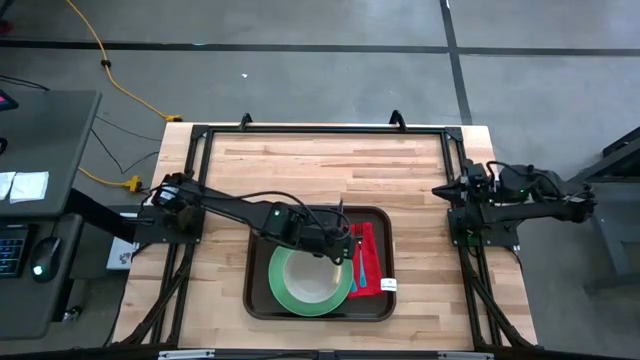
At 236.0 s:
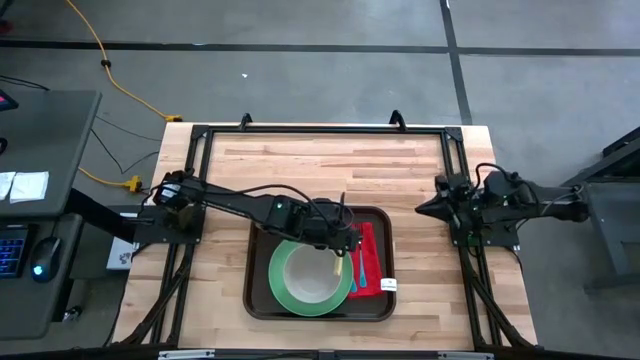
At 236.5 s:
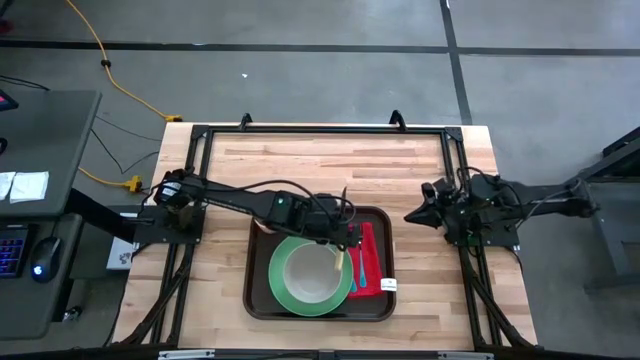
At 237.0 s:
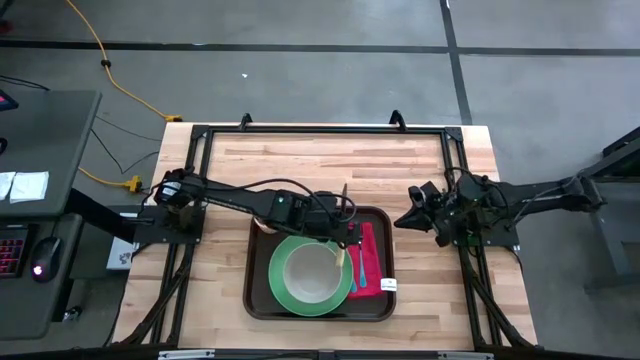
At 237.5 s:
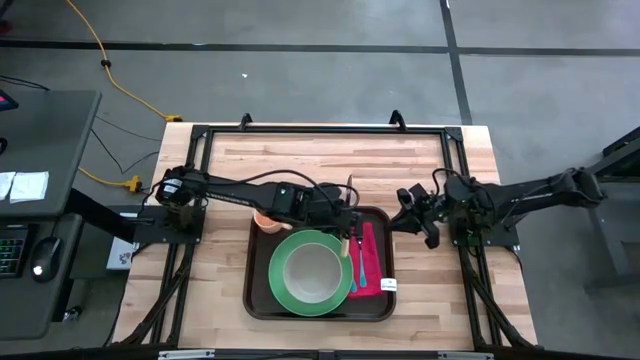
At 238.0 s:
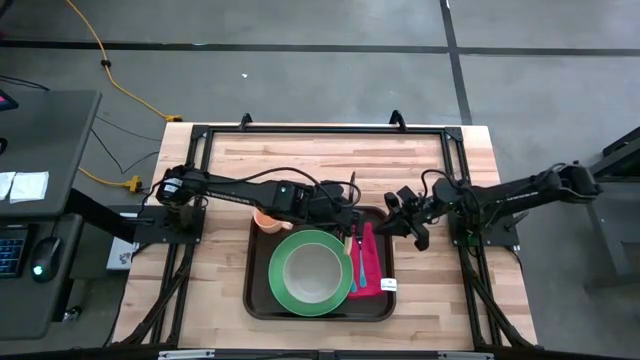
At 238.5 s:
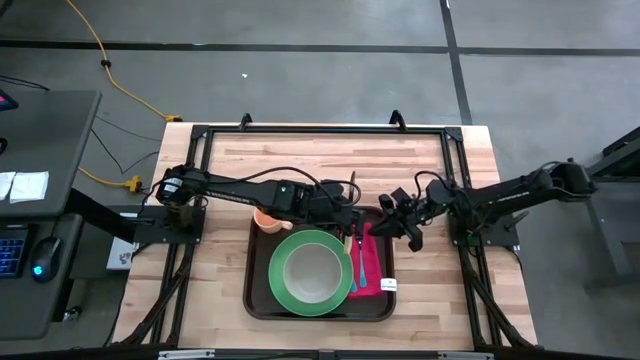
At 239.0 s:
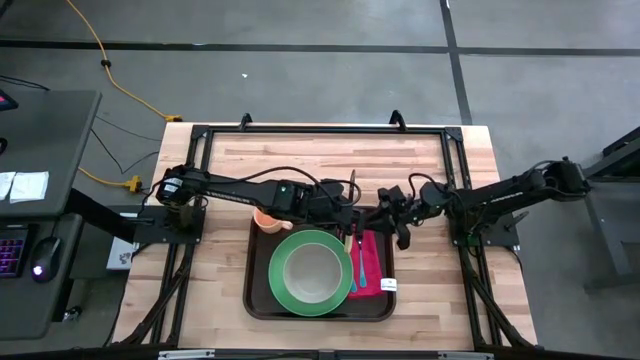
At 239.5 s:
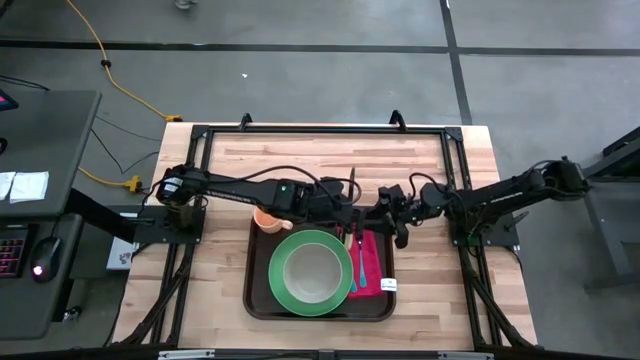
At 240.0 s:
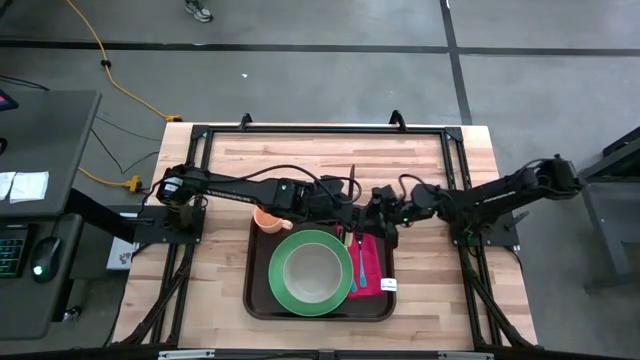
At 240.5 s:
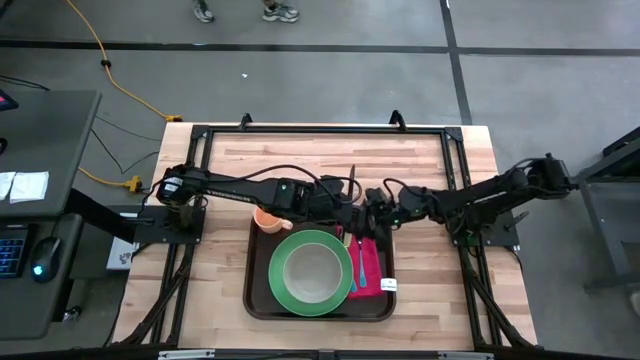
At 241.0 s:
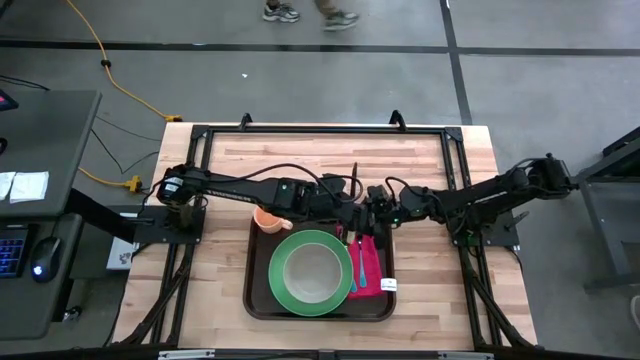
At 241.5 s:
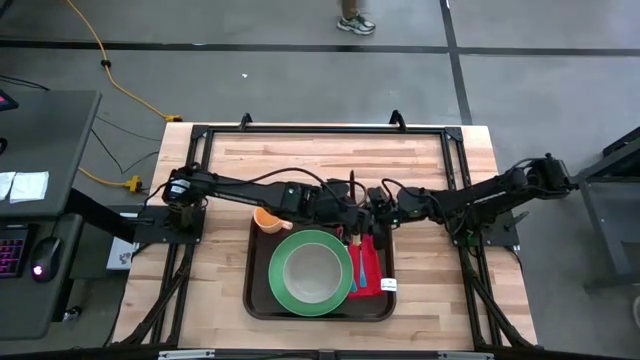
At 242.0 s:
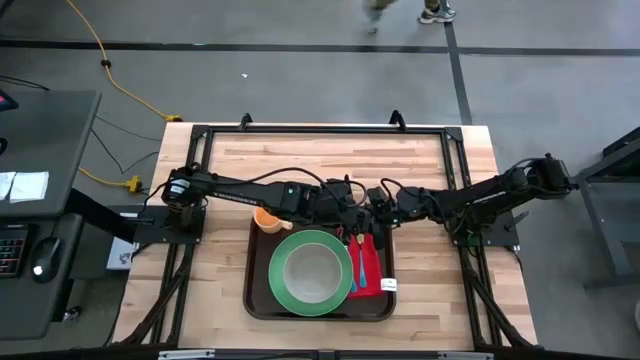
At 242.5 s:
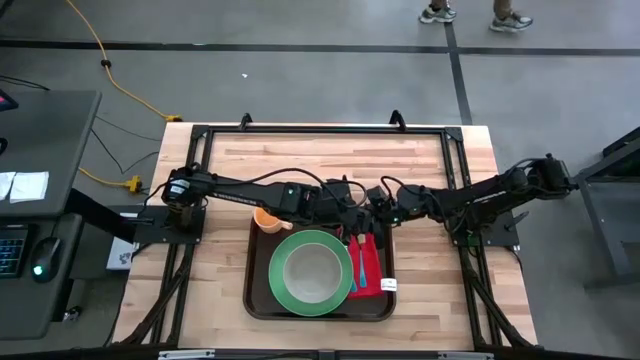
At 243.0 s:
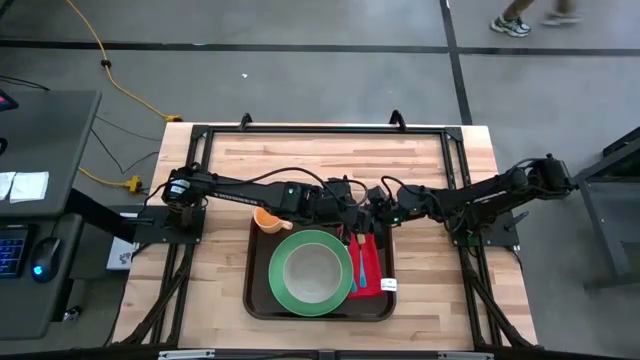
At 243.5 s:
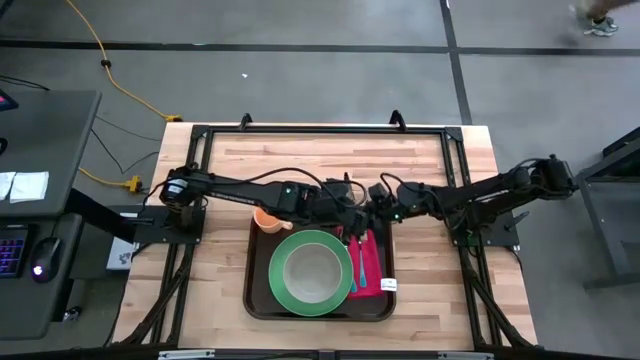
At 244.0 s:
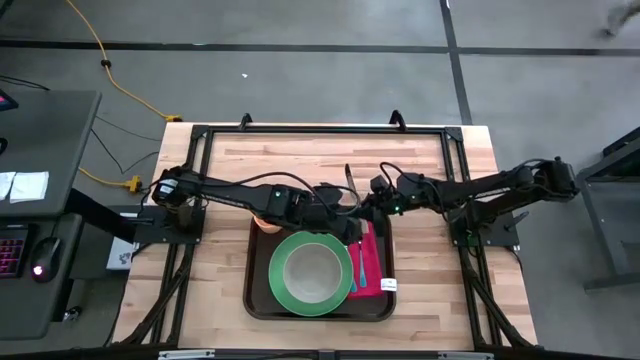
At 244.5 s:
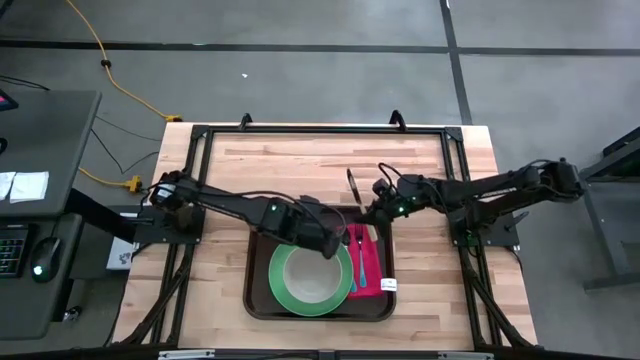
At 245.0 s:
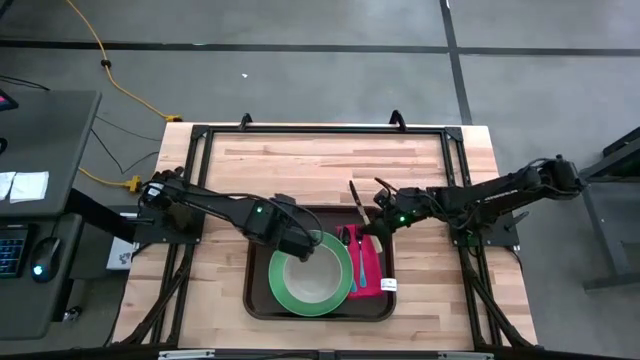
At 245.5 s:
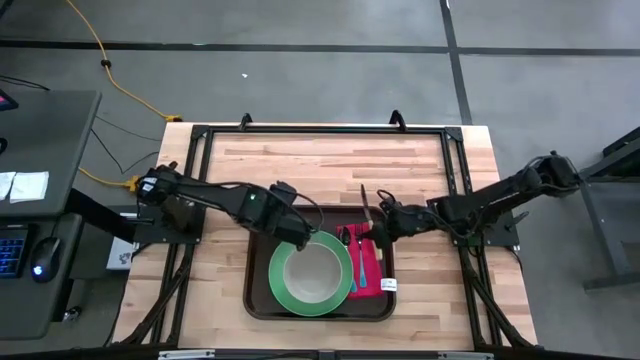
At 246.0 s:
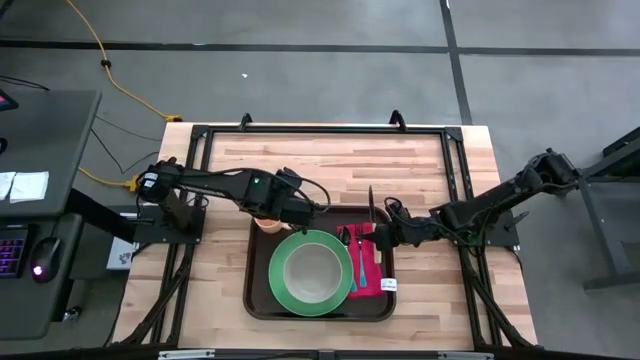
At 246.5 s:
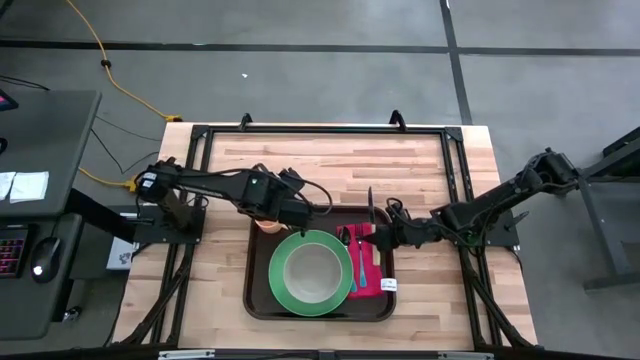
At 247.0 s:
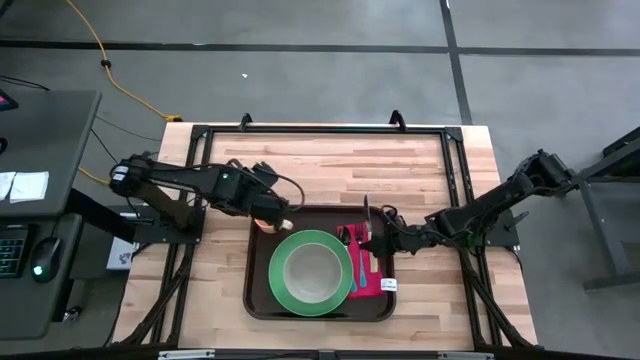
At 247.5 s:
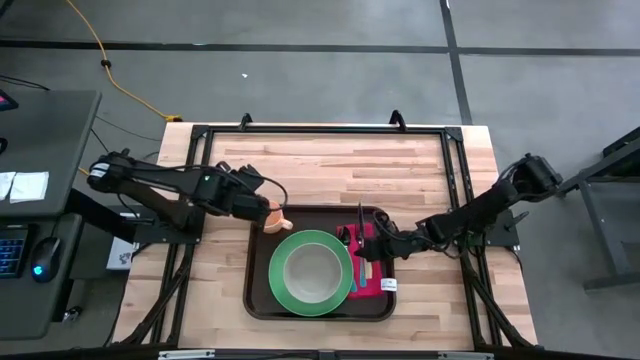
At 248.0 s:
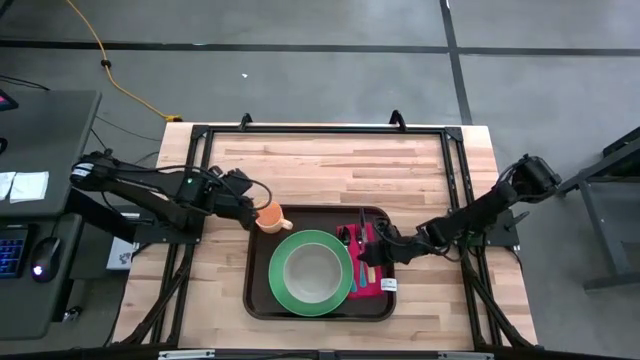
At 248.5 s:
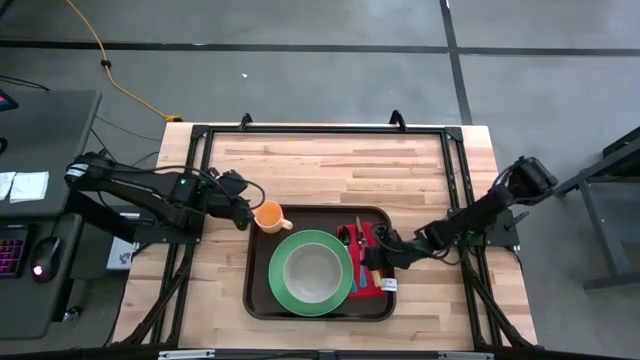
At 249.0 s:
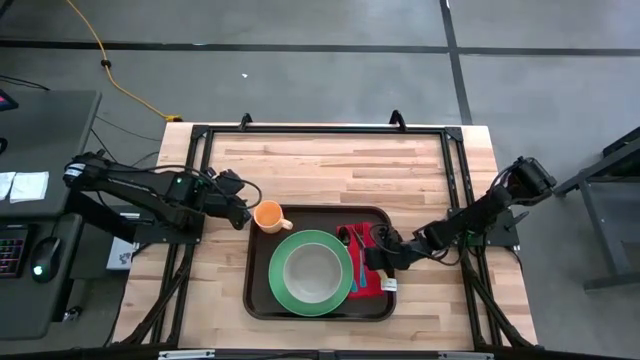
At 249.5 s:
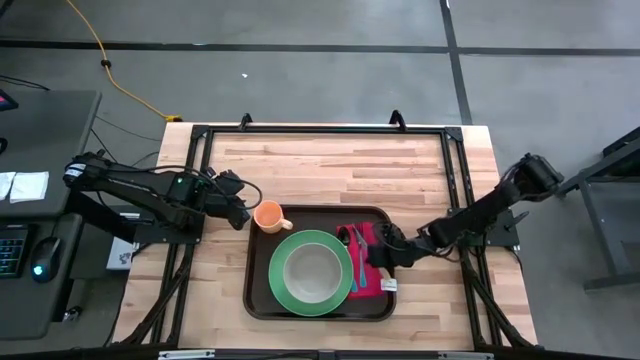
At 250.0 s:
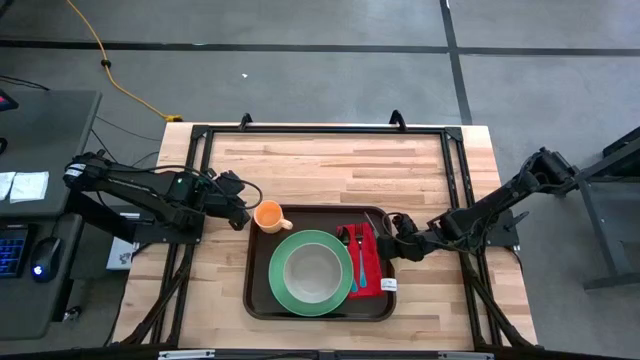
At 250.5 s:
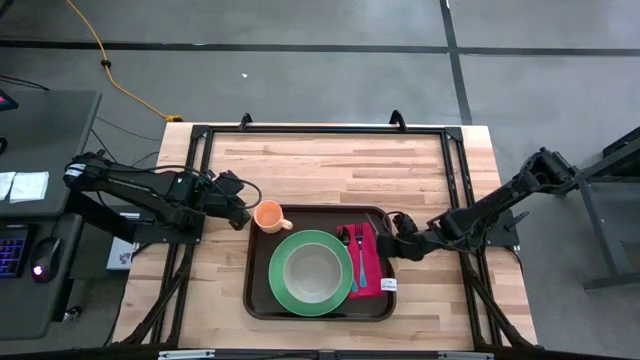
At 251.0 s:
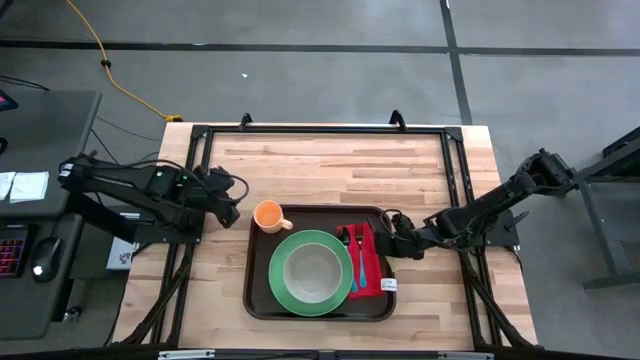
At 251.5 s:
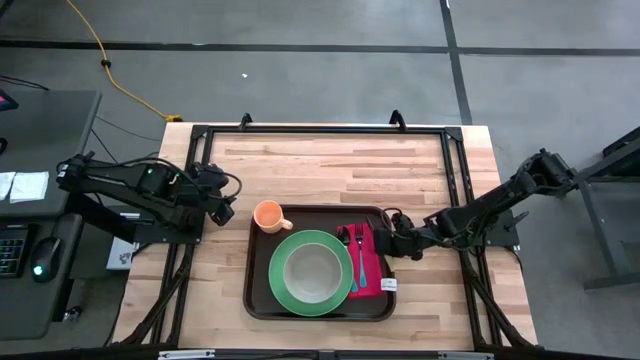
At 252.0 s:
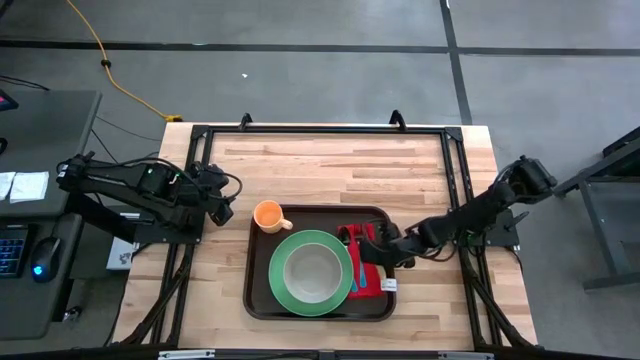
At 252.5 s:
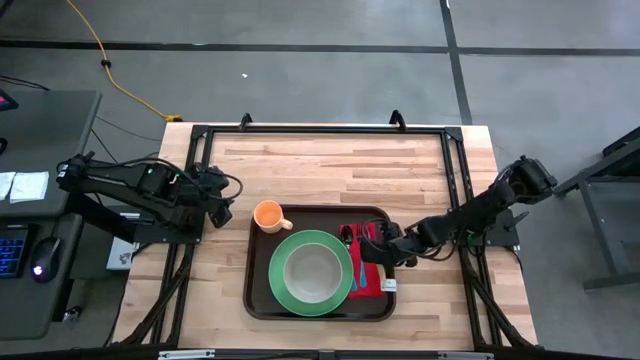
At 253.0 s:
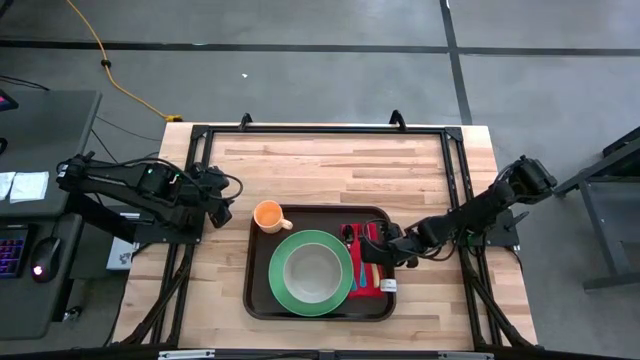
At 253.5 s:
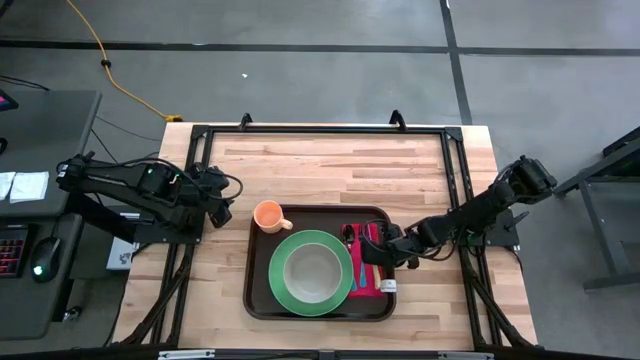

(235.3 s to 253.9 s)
Task: Set up tray
Put the yellow table knife on the red table napkin to the right of the blue fork

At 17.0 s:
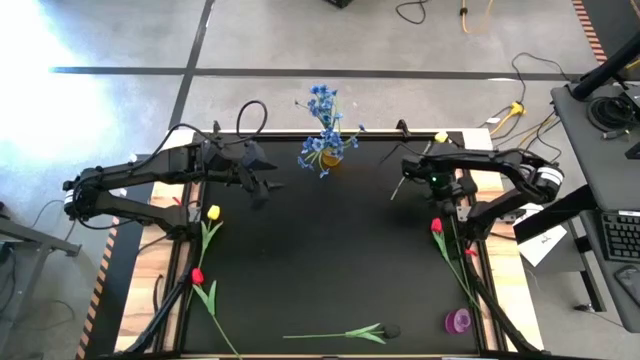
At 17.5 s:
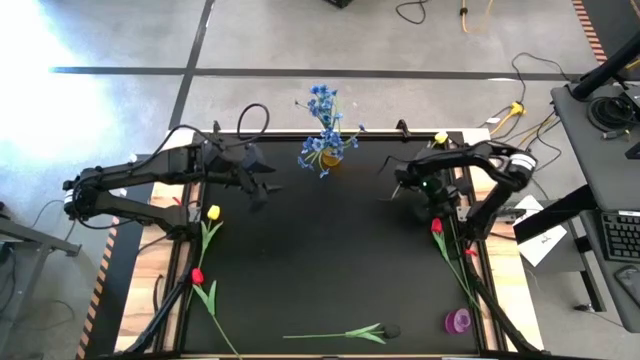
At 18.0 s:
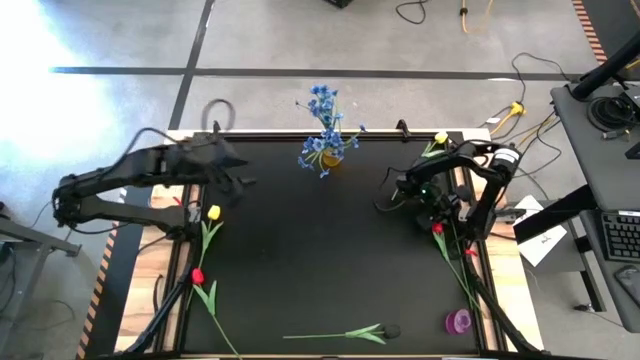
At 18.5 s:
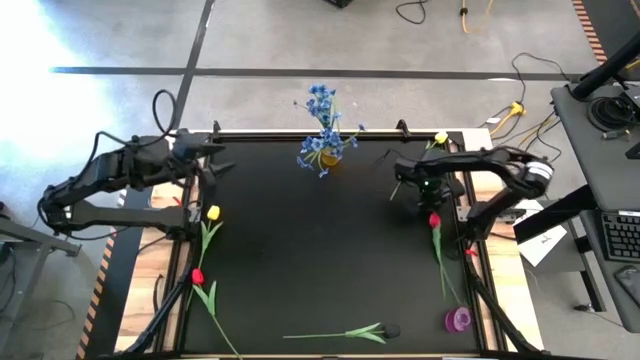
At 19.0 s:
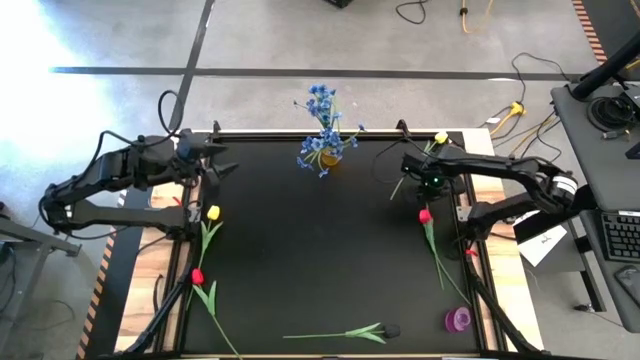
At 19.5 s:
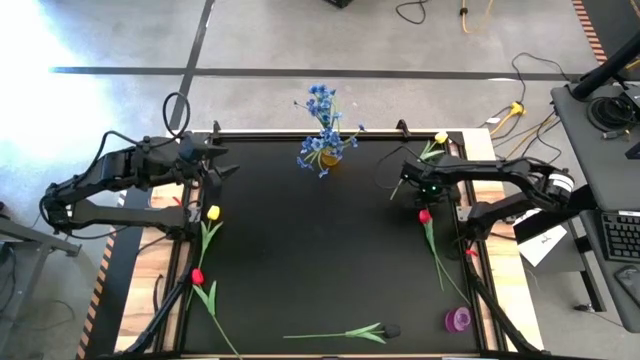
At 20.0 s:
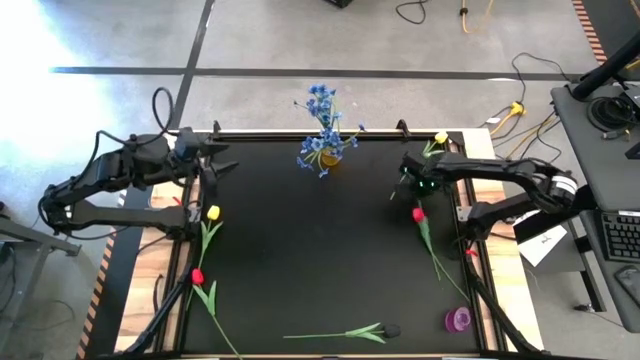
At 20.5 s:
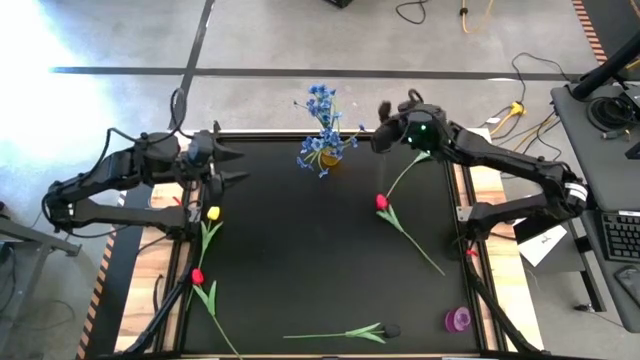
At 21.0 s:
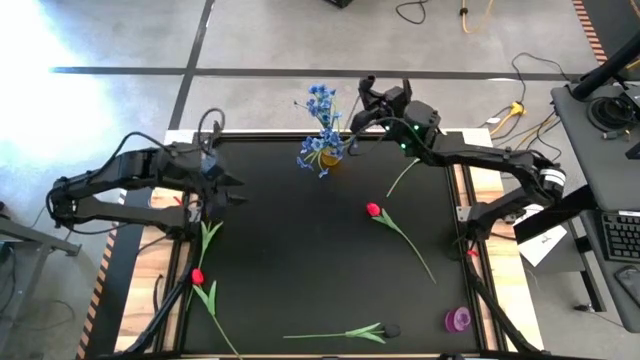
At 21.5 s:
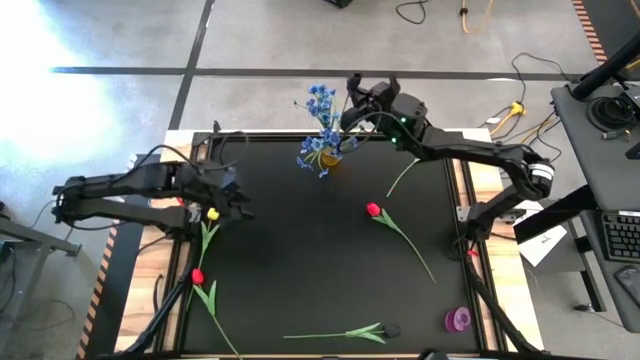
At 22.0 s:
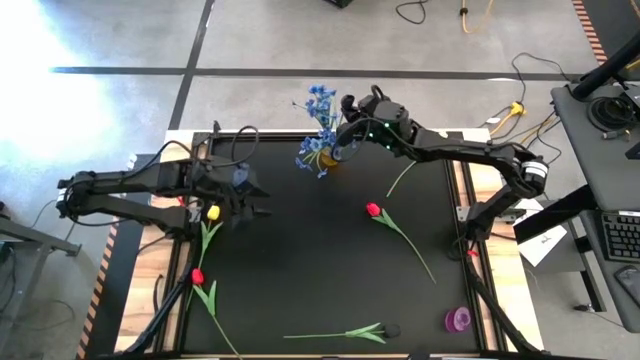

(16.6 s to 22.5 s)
Task: Sort flowers into vase by color
Put the top black flower into the yellow vase
